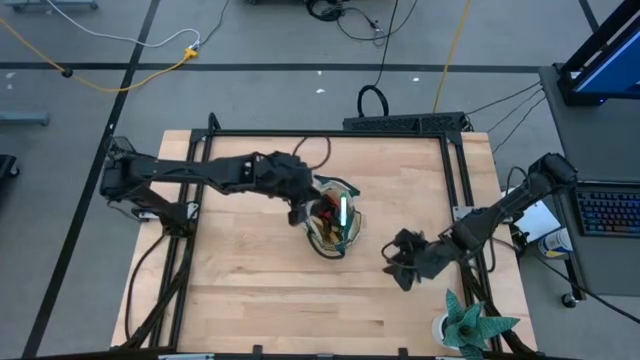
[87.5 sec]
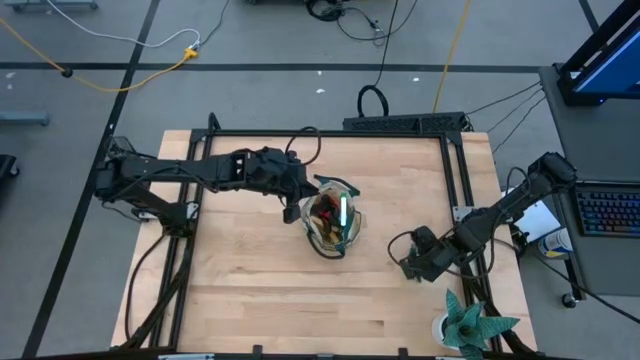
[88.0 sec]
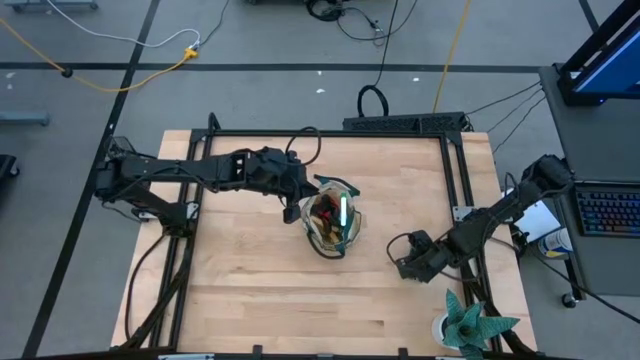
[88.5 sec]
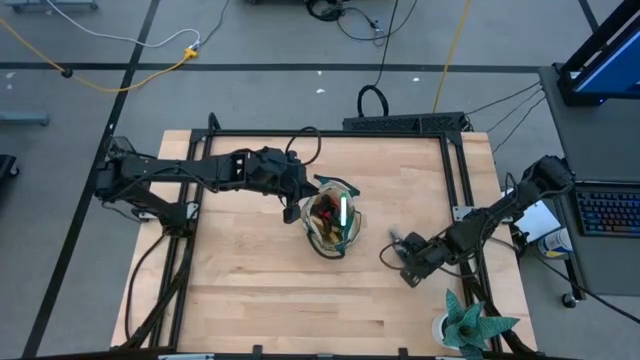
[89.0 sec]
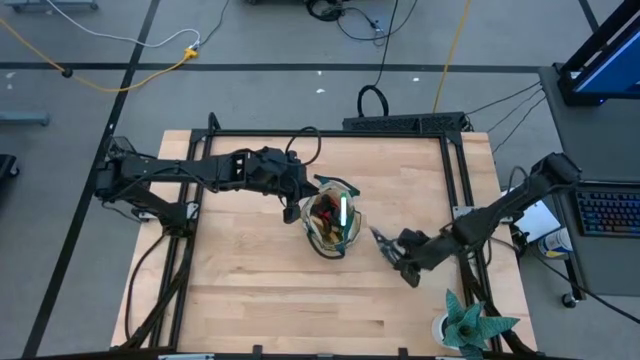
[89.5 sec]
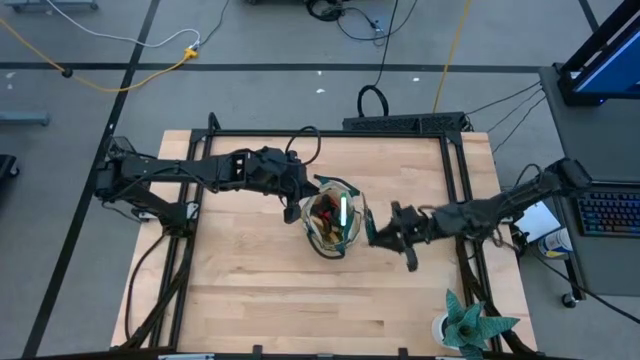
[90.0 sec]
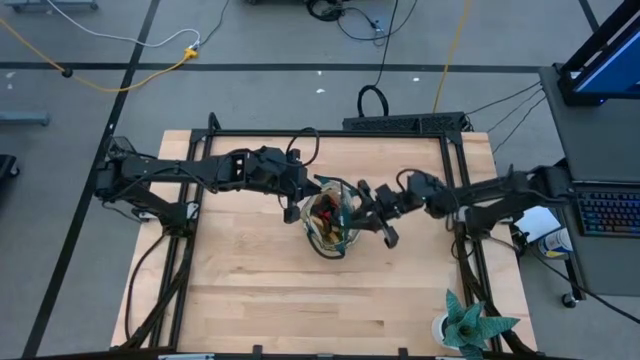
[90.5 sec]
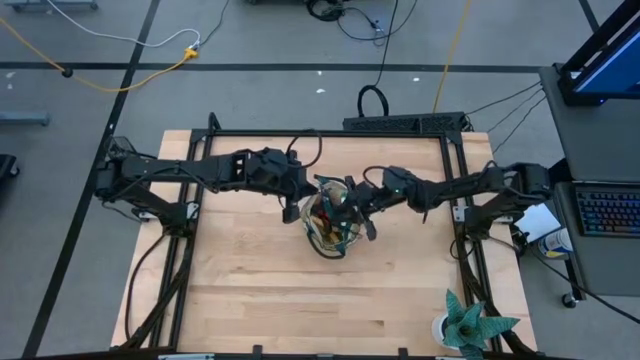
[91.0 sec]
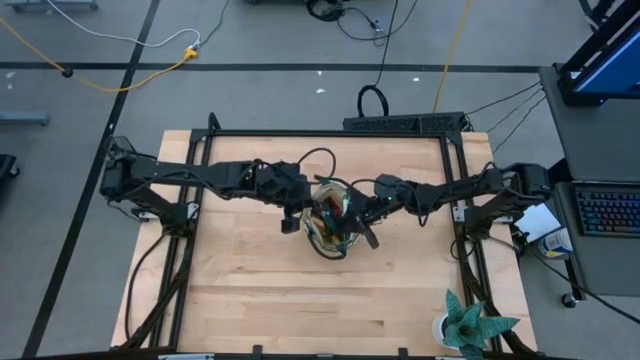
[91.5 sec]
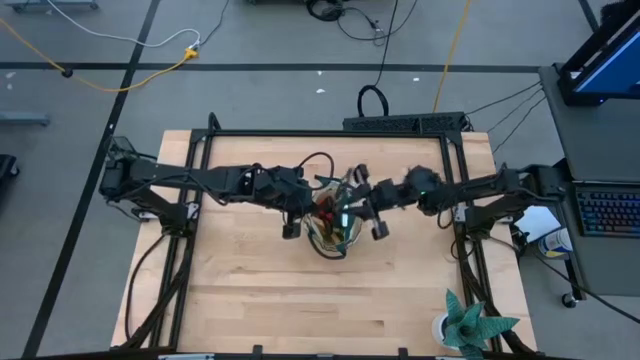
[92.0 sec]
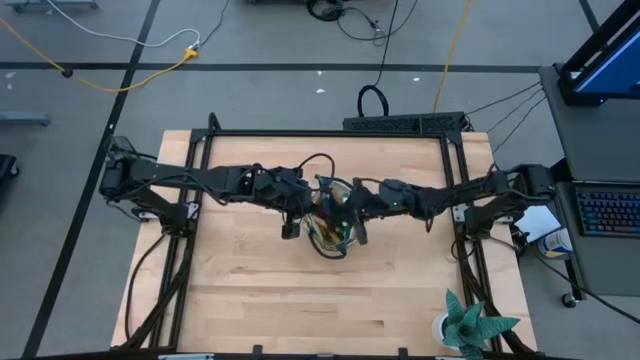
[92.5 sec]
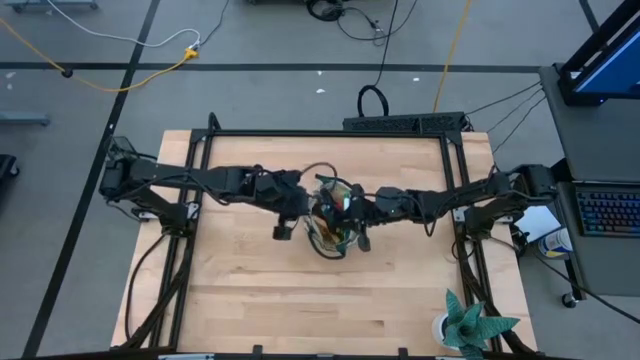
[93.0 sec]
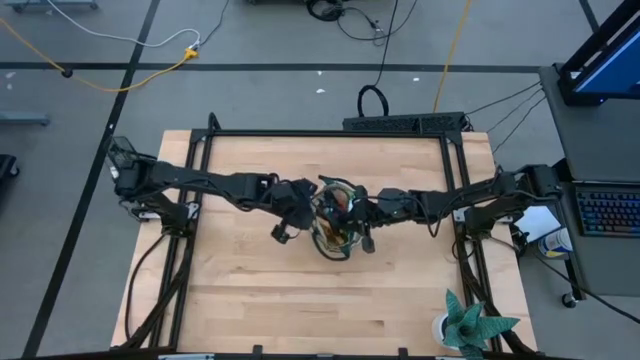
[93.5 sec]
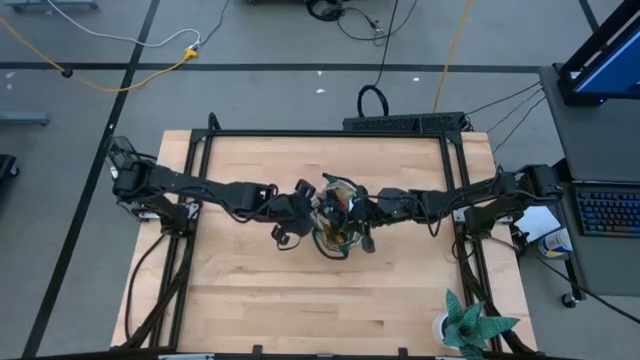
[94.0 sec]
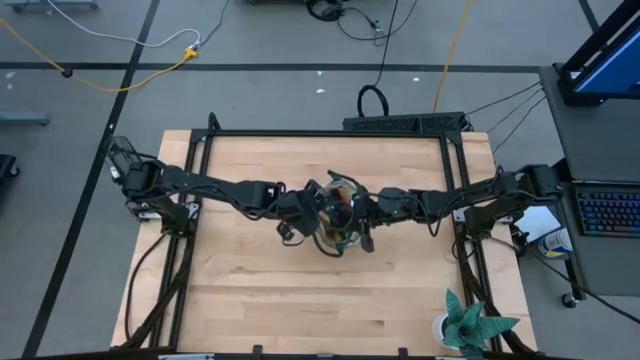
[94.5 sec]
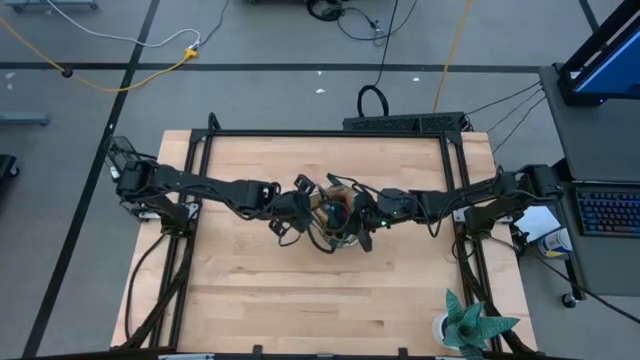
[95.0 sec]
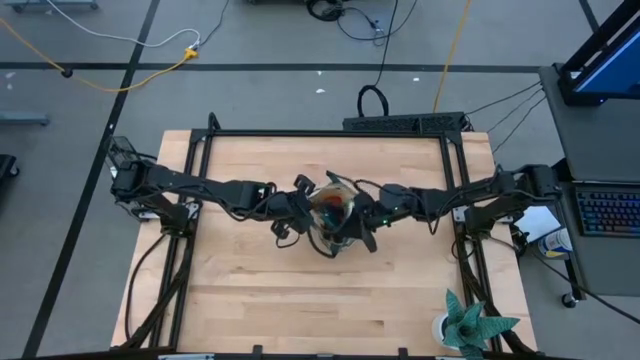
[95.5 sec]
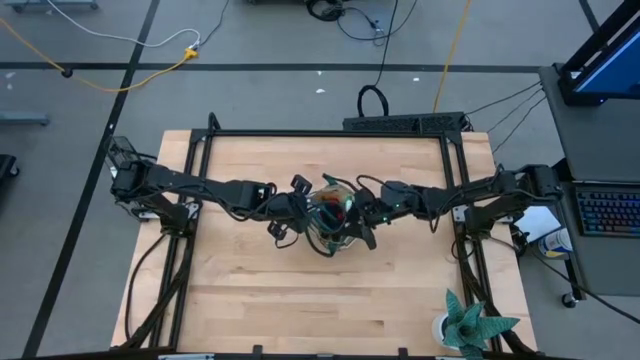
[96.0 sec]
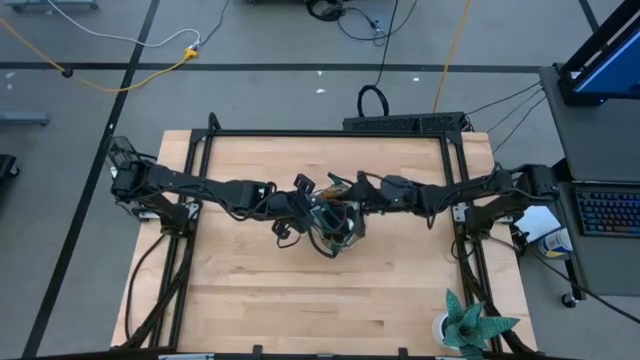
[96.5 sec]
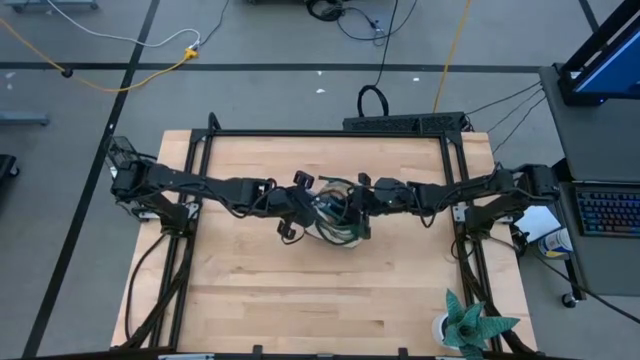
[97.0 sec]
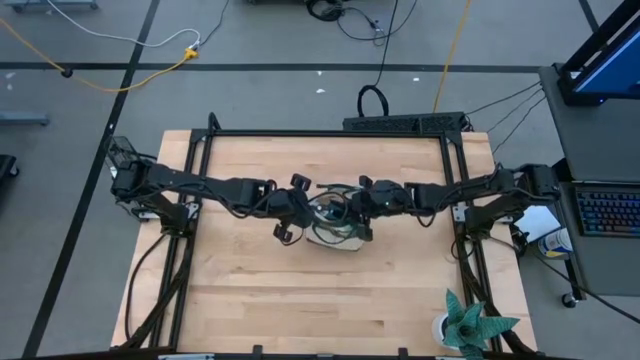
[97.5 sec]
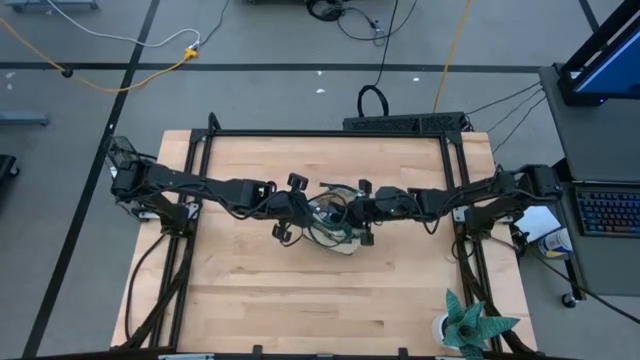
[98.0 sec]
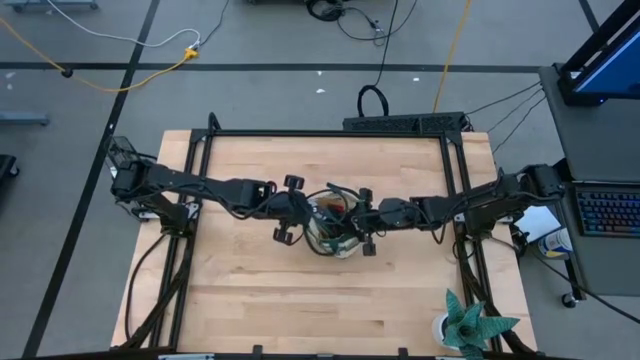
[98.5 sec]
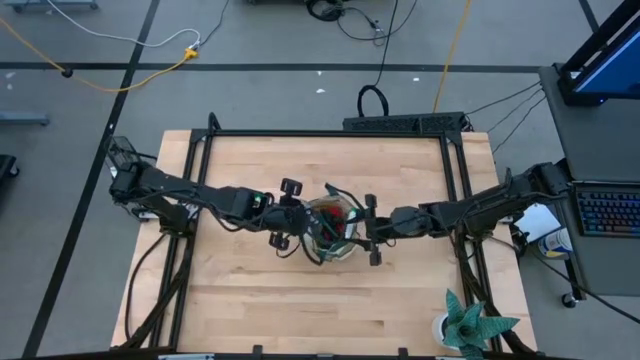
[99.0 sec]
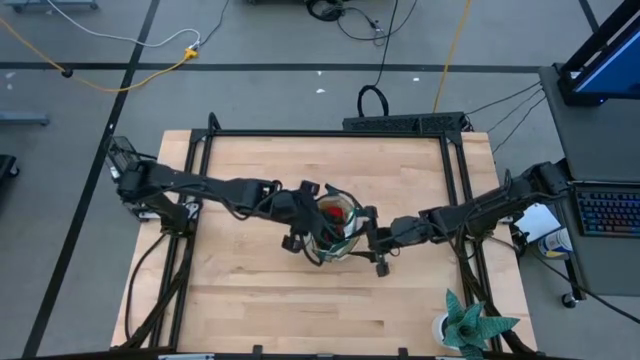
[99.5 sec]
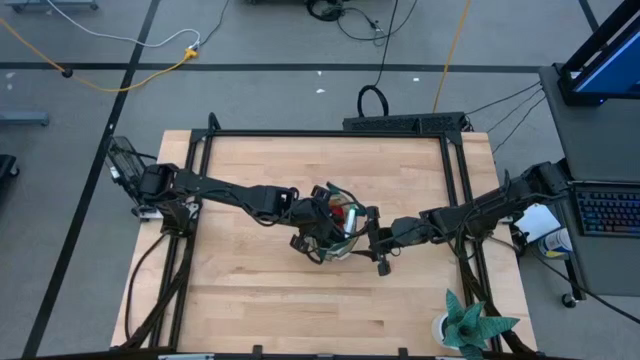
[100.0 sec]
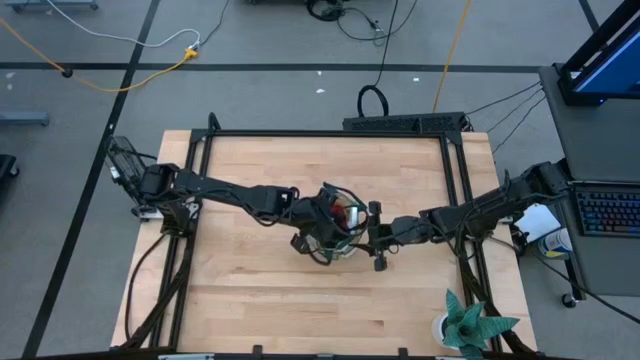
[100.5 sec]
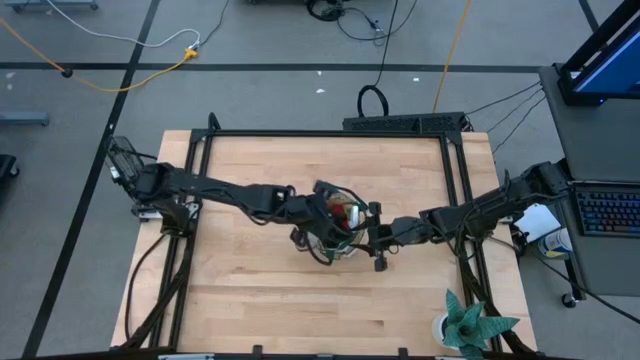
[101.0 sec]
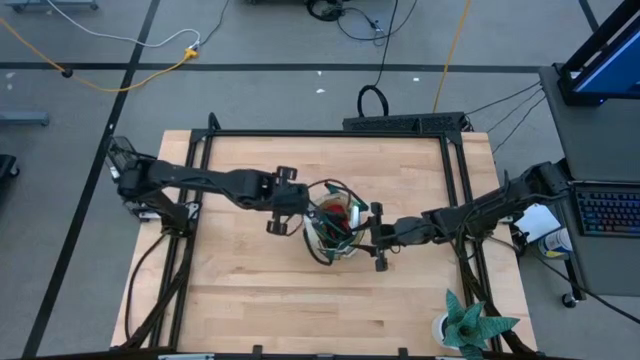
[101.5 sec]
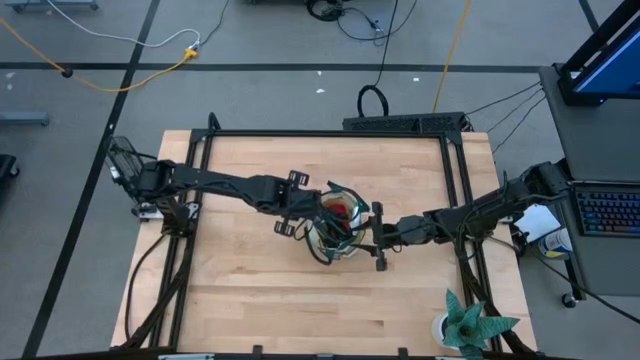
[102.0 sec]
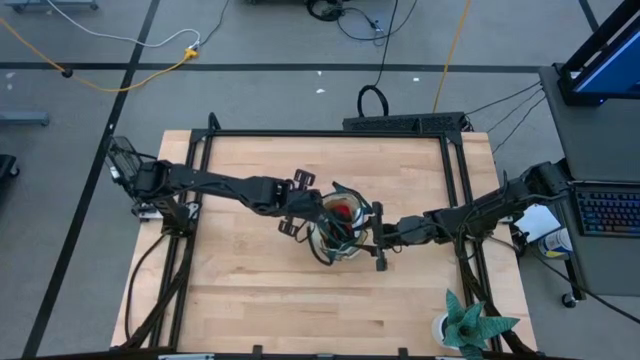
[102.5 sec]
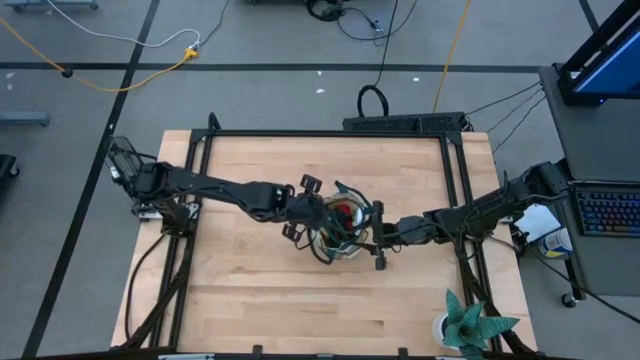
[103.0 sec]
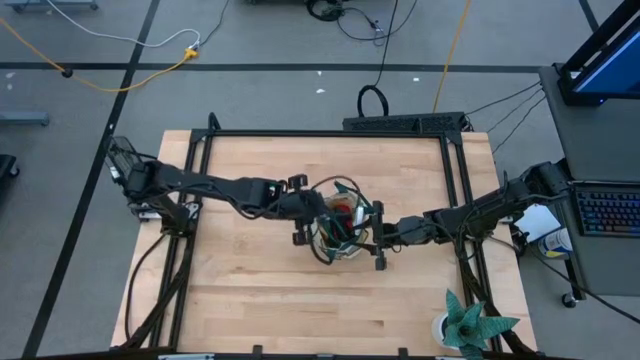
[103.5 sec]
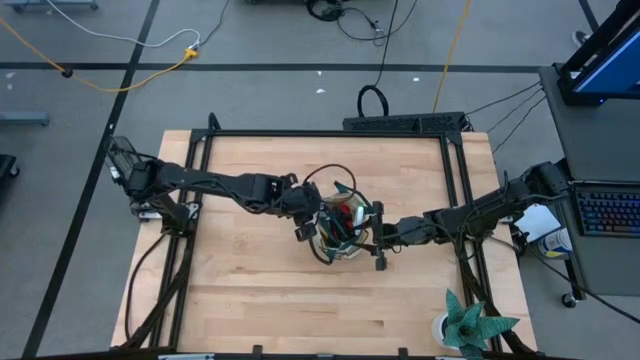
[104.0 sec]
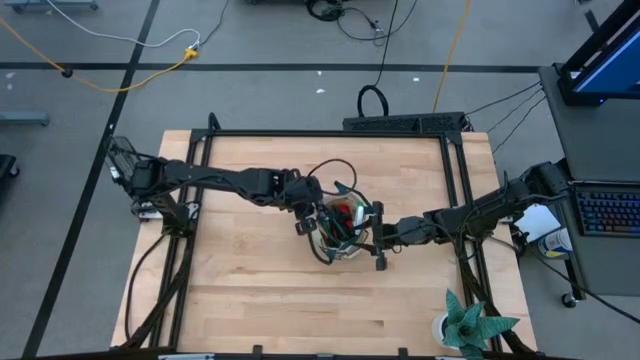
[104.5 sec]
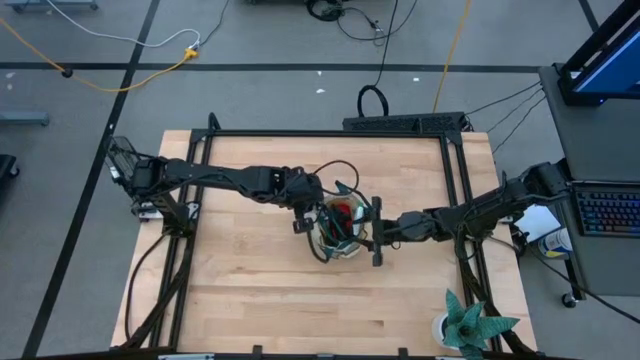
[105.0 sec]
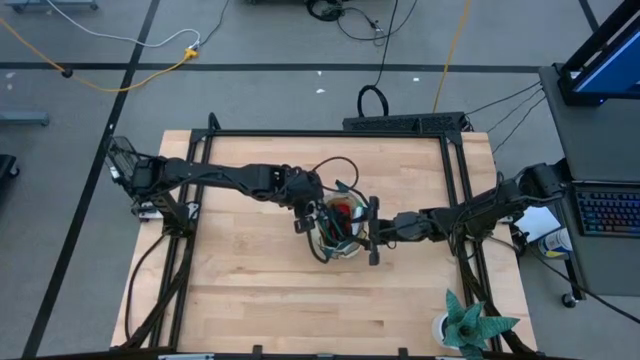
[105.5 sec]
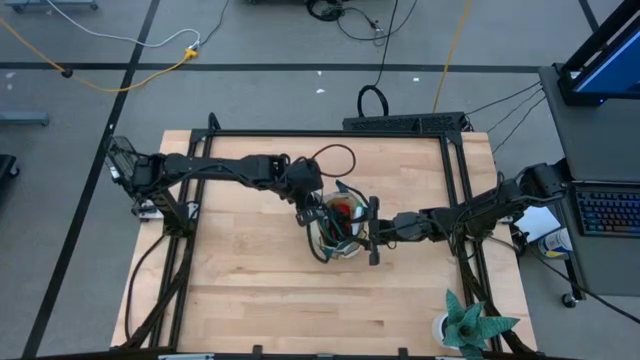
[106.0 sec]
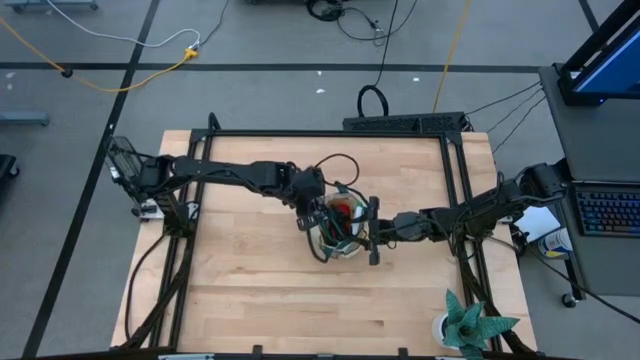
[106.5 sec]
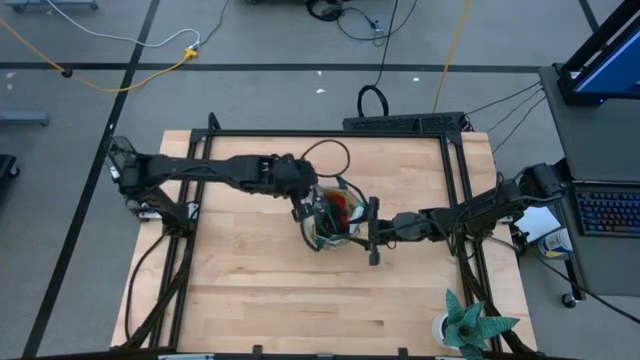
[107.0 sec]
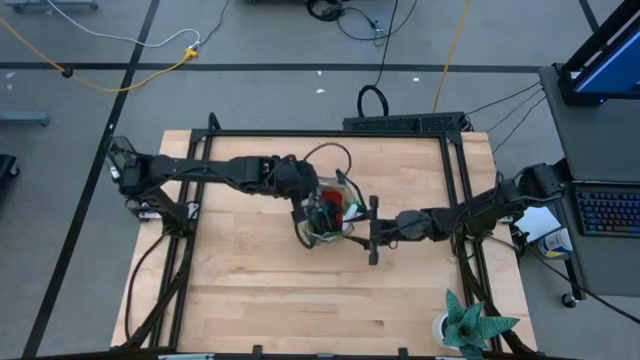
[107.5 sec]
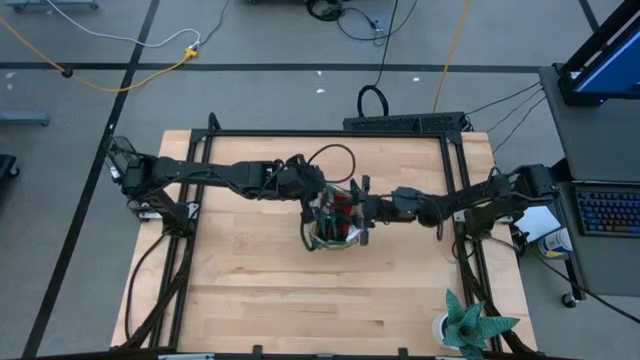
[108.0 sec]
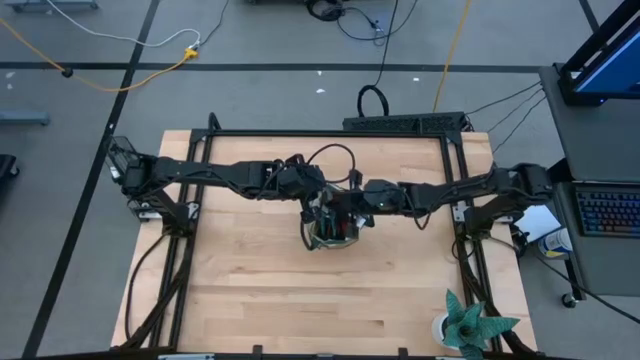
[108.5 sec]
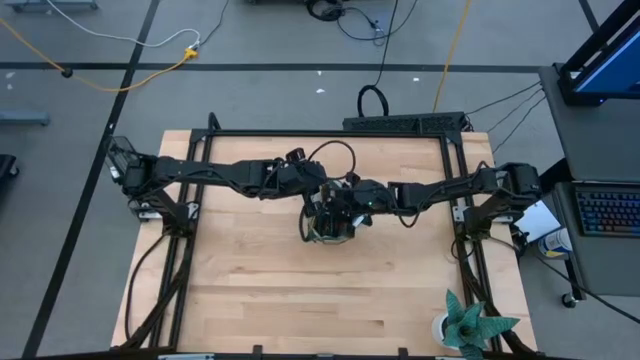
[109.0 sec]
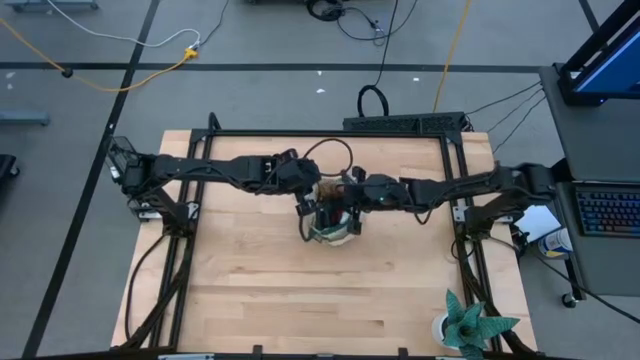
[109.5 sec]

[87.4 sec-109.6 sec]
Task: Pick & Place Garden tools in Gardening bag
Put the green pruner into the brown gardening bag
